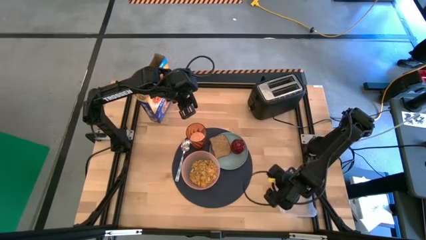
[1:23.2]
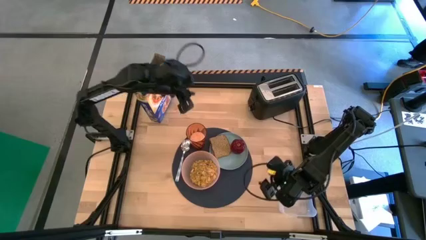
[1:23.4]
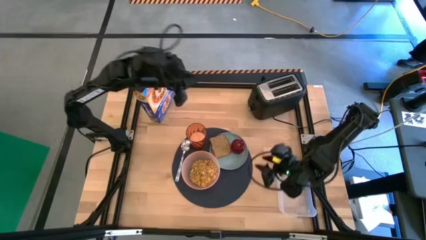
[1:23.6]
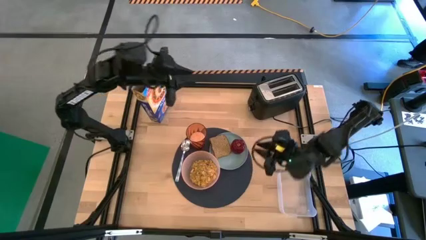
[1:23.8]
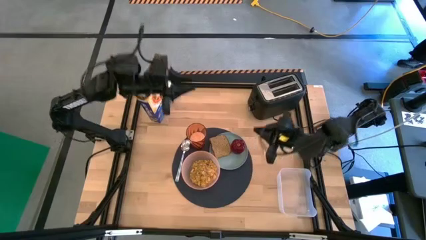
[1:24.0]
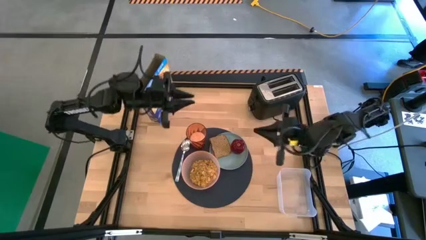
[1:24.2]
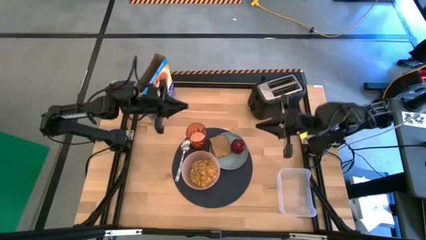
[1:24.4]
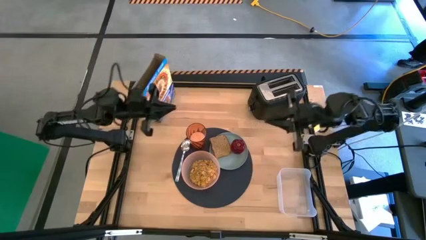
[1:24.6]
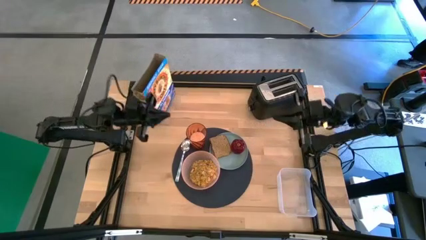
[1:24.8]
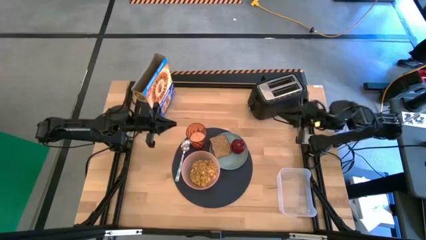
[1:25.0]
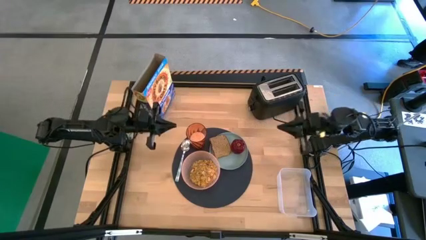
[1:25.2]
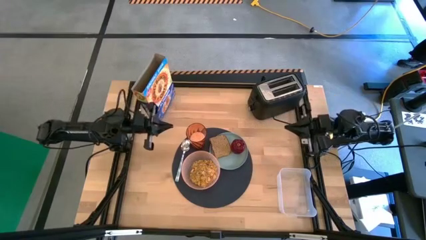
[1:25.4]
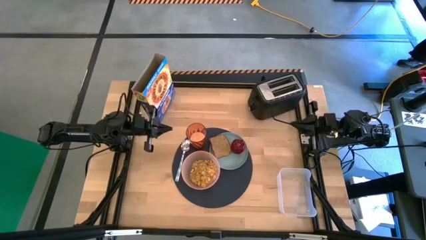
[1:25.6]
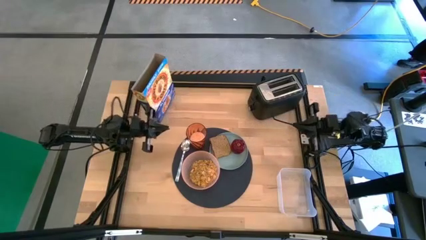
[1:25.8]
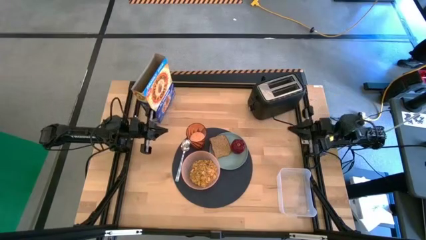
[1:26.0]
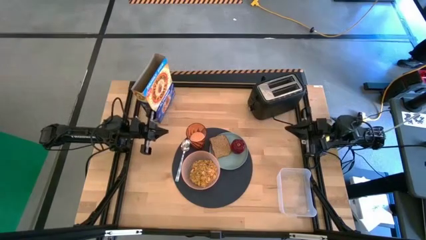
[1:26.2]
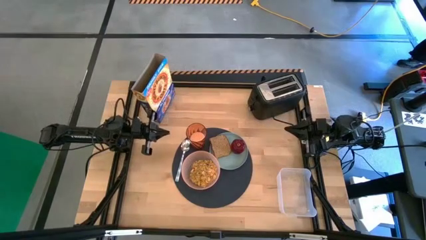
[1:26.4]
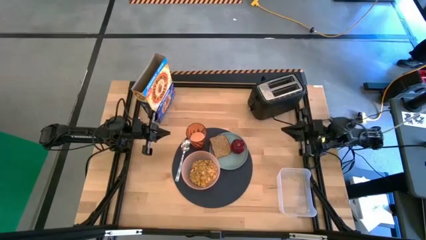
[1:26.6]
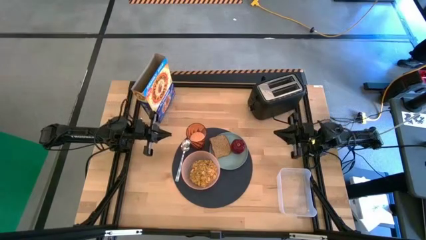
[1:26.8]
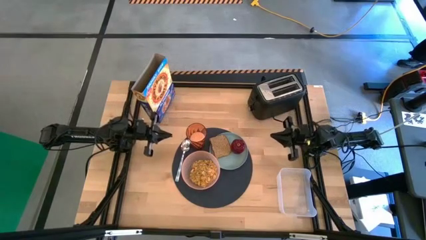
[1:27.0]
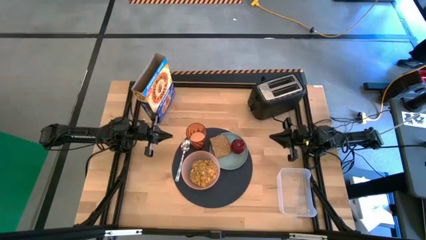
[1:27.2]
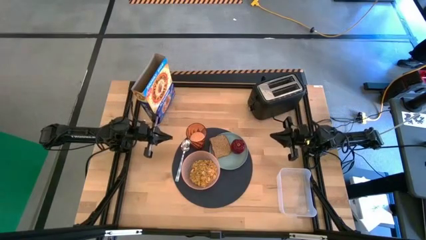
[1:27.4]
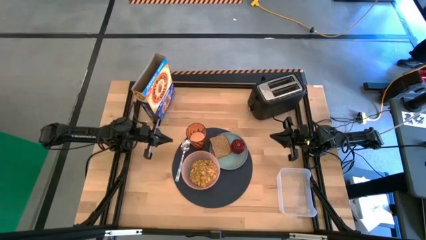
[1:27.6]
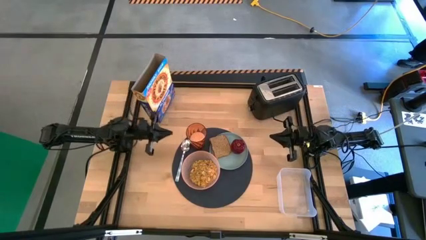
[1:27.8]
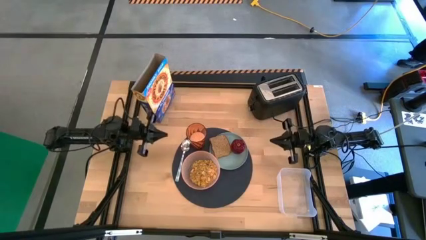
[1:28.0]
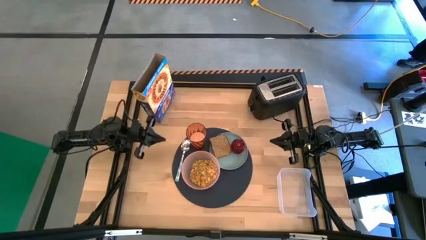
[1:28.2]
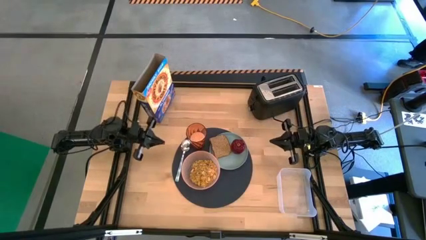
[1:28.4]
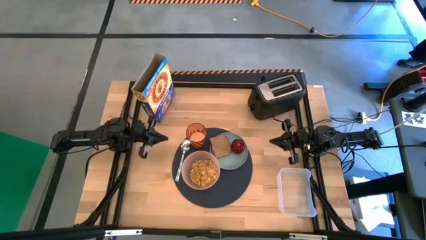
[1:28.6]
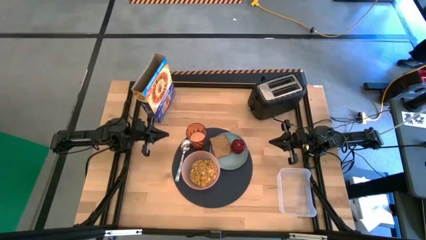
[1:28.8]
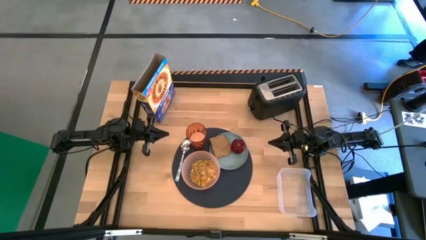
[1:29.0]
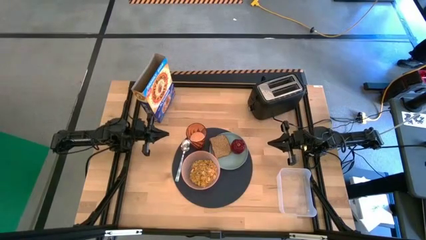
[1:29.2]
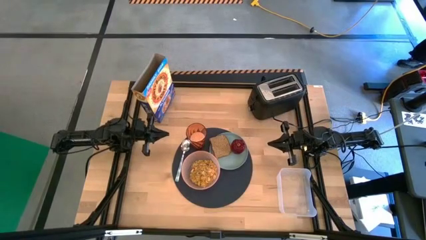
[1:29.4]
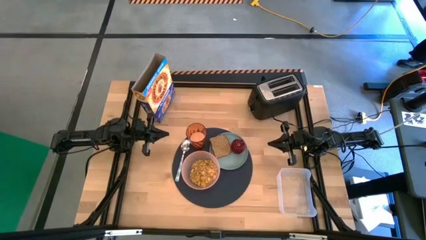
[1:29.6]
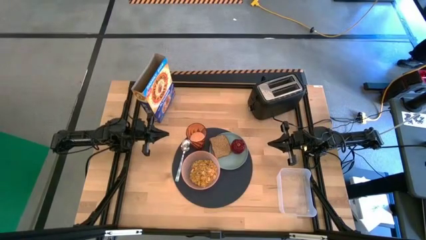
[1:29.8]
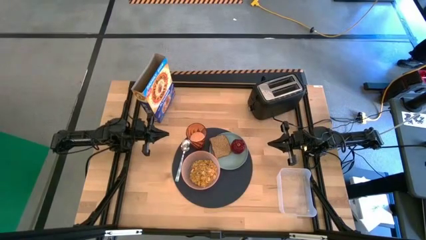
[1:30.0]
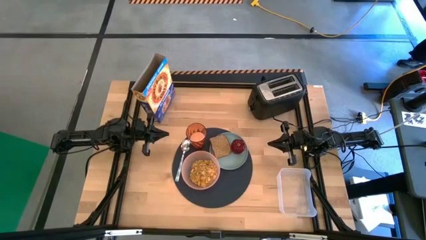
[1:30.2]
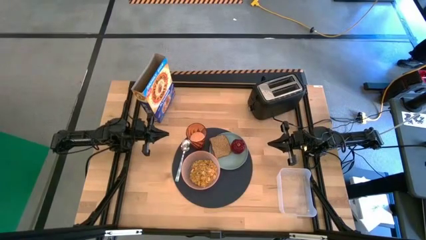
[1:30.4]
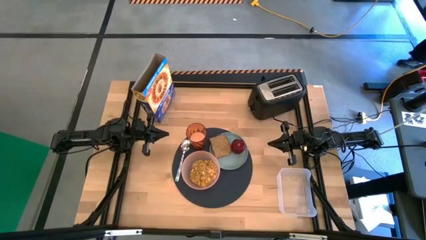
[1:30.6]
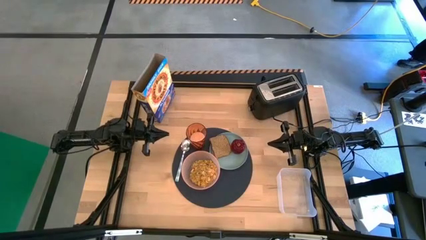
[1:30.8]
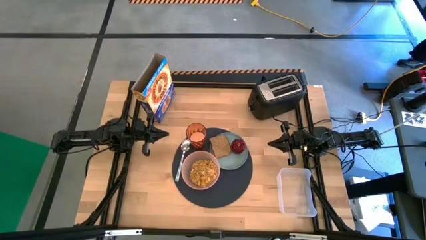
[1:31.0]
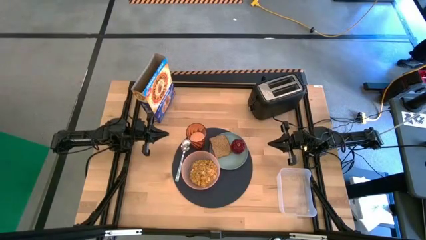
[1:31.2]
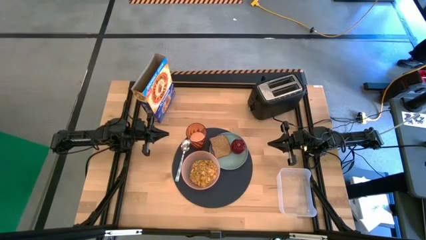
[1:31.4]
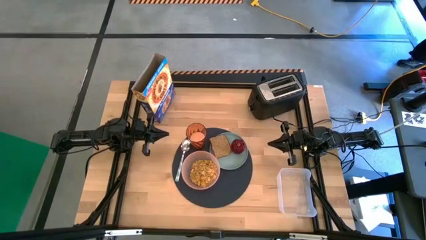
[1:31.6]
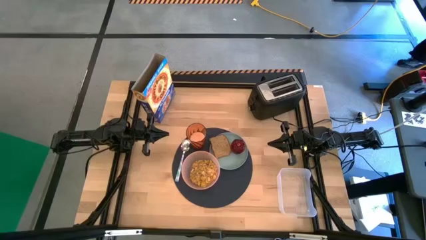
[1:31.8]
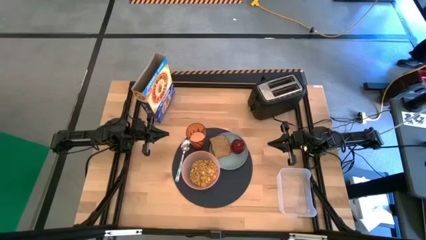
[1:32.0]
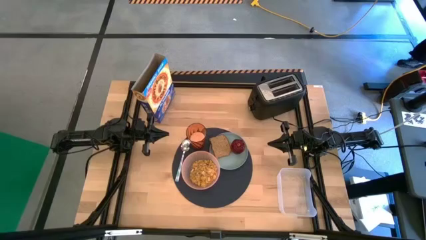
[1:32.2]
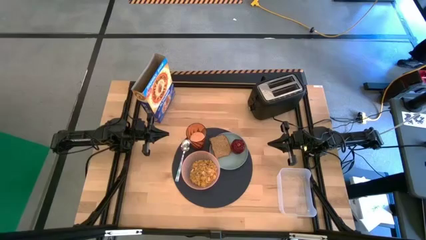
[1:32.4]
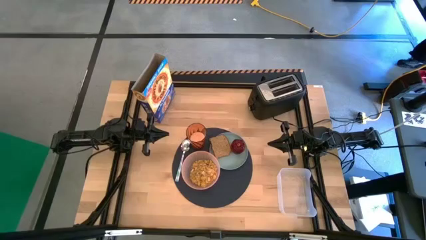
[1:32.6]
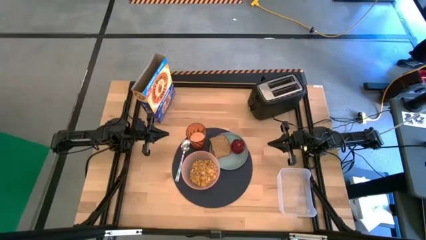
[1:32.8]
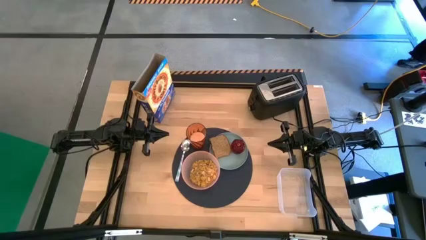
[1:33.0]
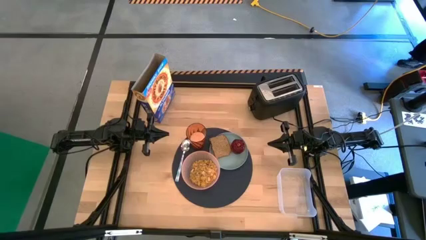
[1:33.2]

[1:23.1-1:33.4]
Task: Arrange a breakfast setting
Return to Home Position

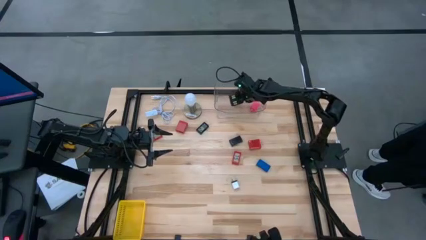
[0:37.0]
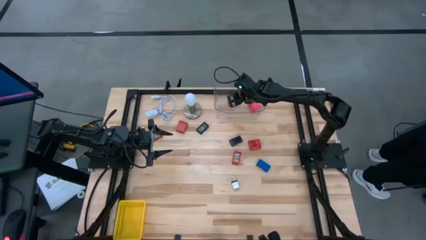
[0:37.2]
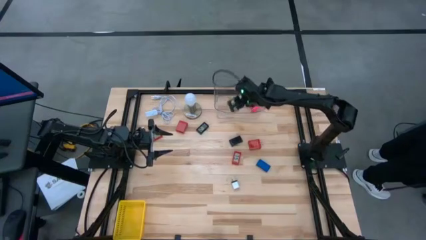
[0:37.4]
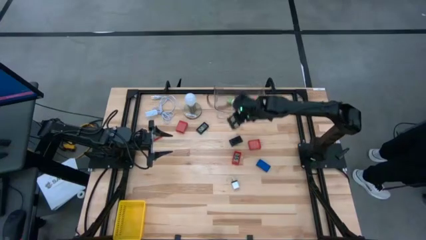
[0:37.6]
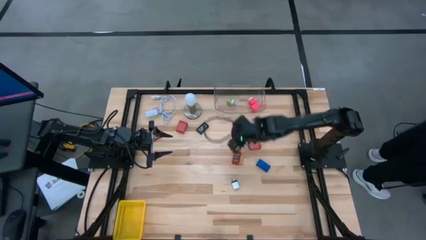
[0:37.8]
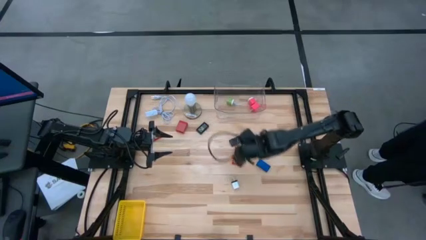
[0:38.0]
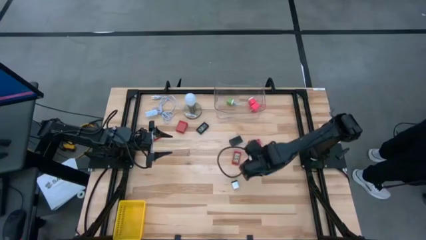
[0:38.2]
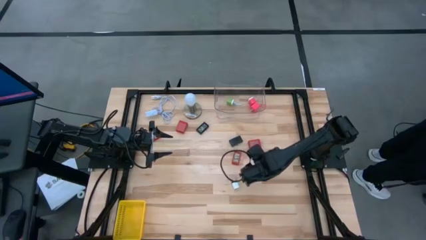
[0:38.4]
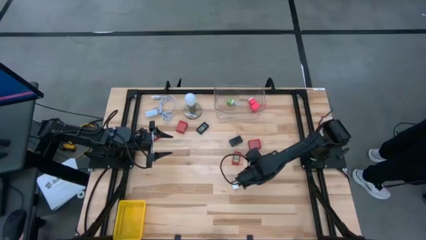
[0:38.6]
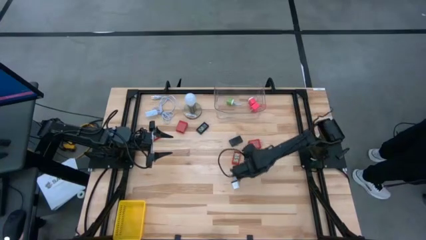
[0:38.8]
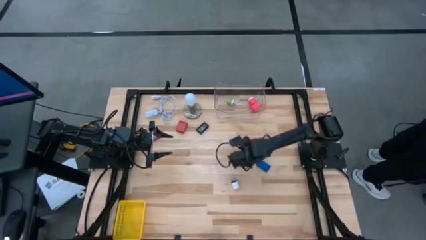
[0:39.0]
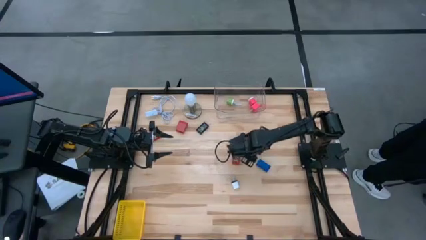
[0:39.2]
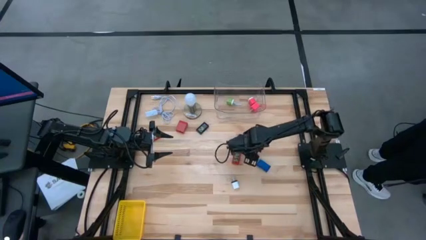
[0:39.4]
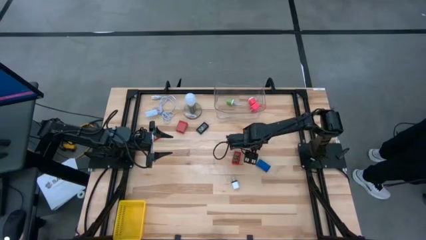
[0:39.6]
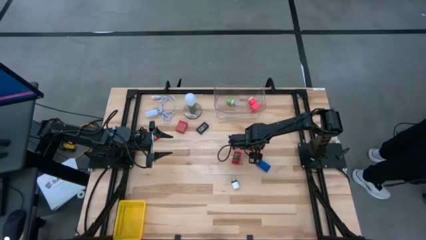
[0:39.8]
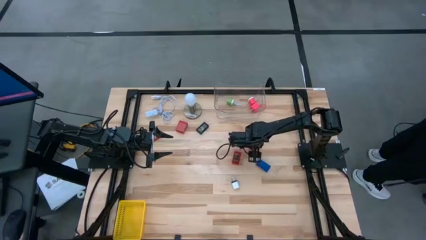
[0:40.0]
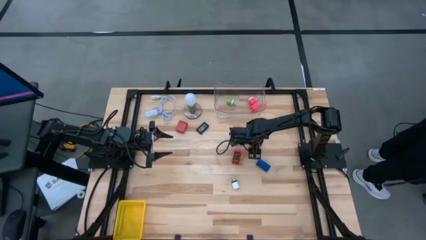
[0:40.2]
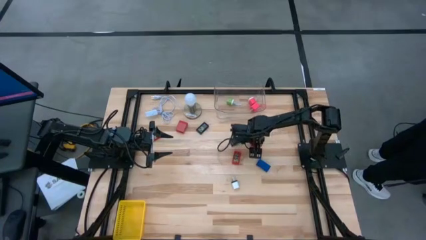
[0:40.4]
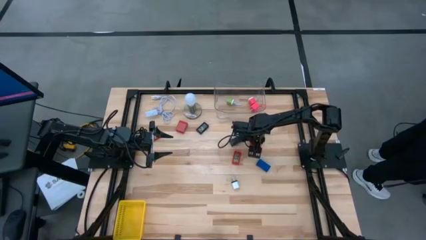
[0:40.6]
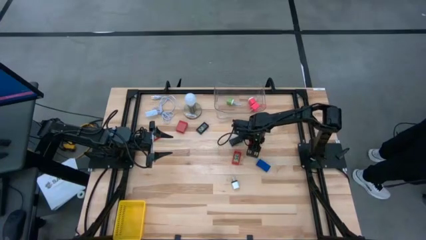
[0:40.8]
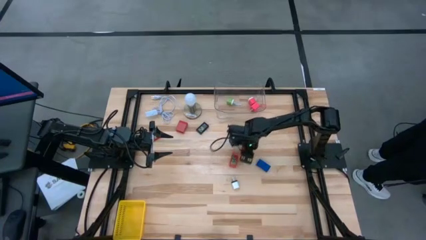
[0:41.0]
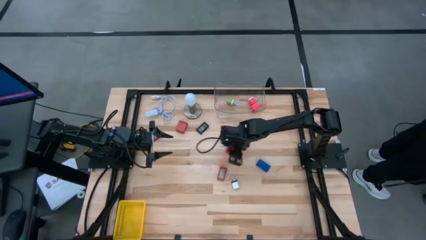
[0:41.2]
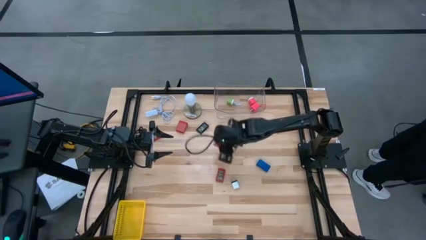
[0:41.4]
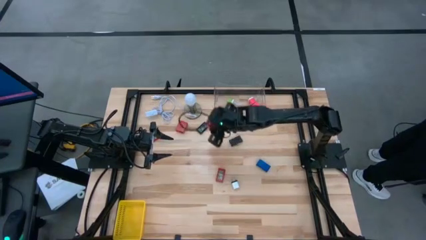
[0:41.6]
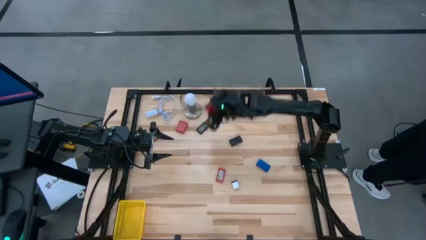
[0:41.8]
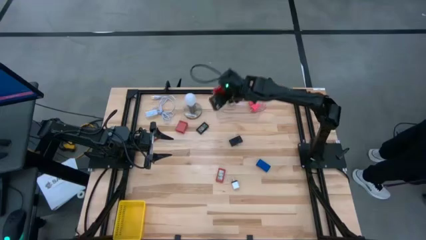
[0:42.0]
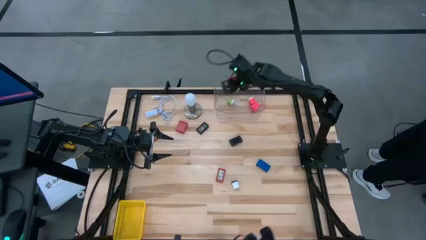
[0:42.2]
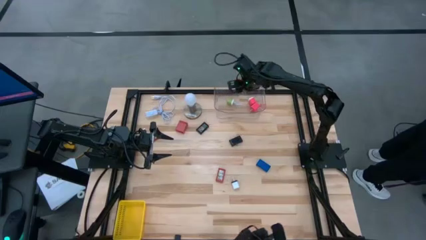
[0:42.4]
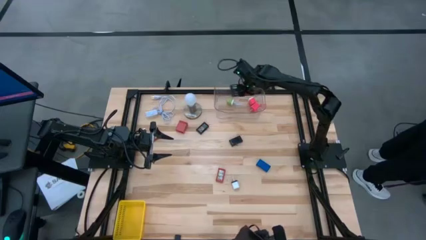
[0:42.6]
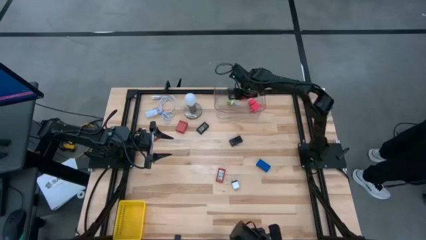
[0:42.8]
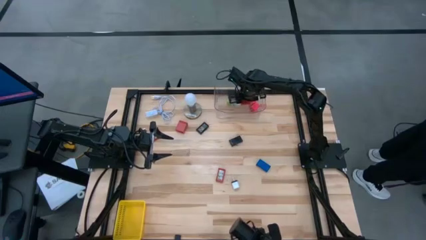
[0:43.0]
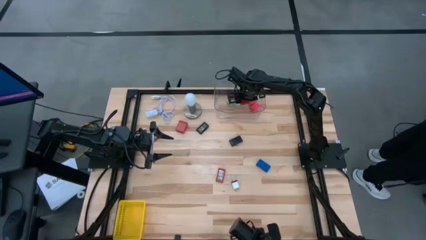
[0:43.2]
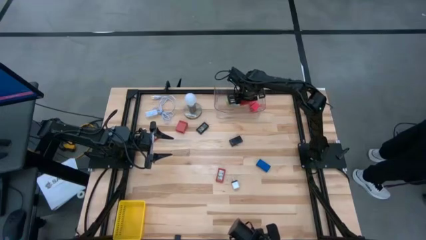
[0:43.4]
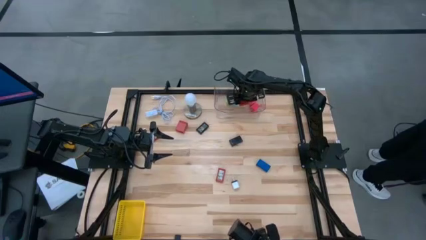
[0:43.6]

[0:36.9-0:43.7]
Task: Pick & Place Office items
Put the right red charger adapter into the transparent bin
